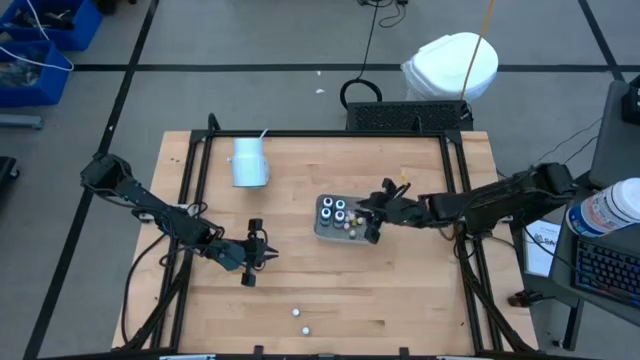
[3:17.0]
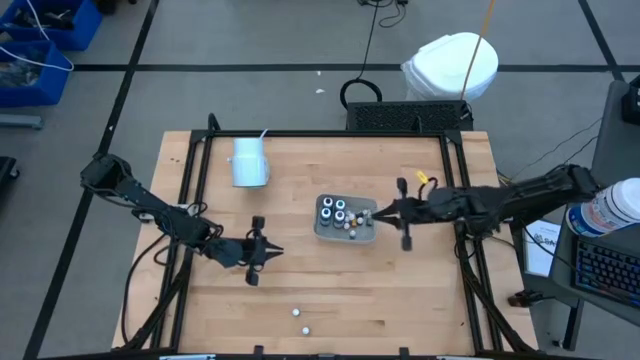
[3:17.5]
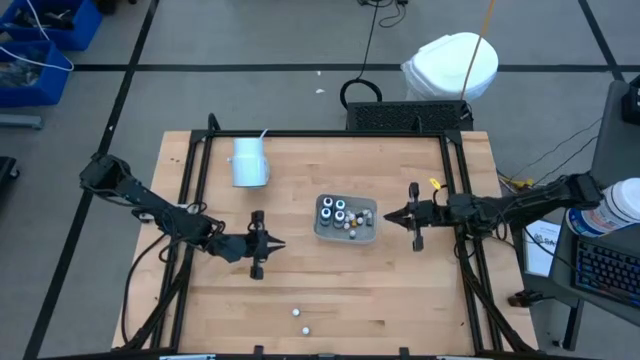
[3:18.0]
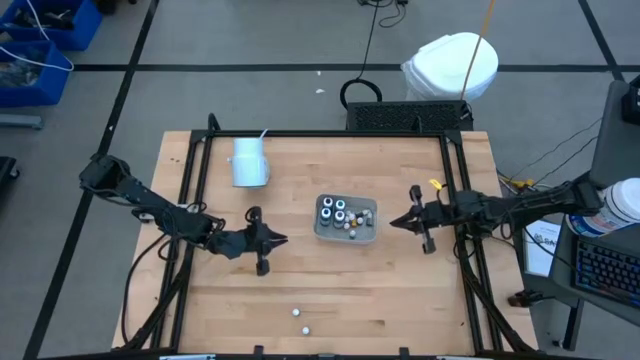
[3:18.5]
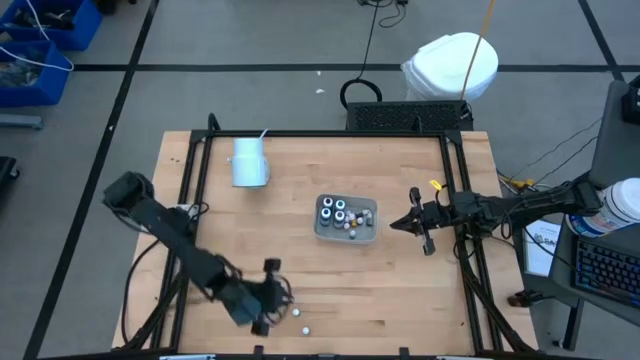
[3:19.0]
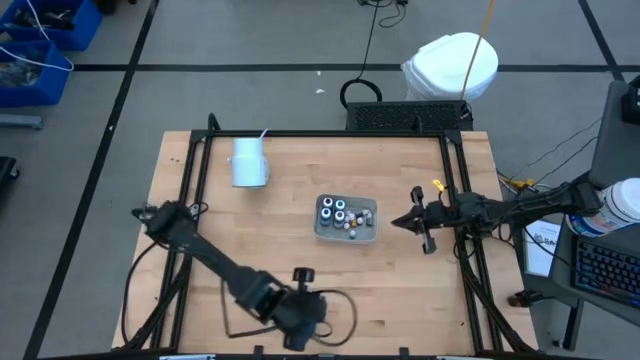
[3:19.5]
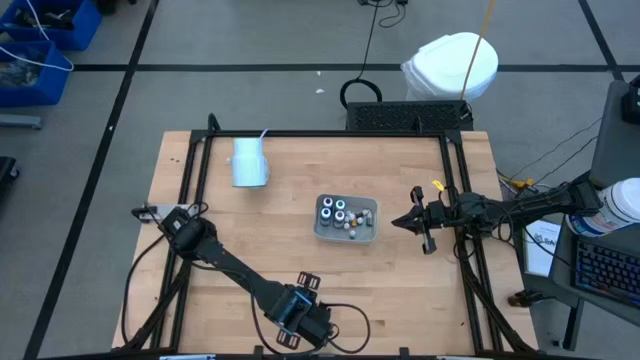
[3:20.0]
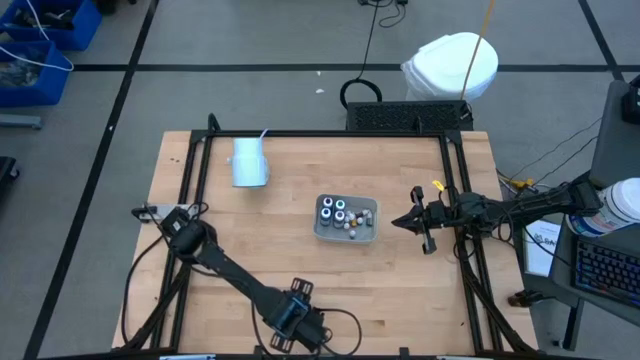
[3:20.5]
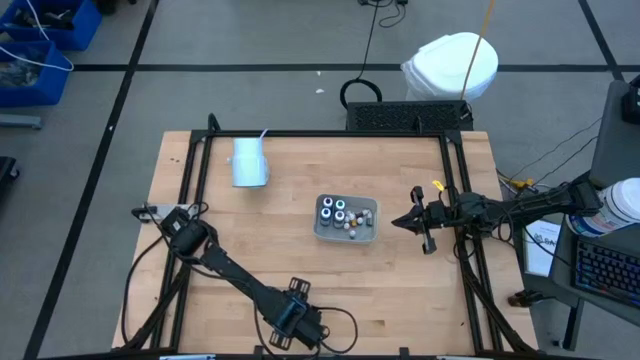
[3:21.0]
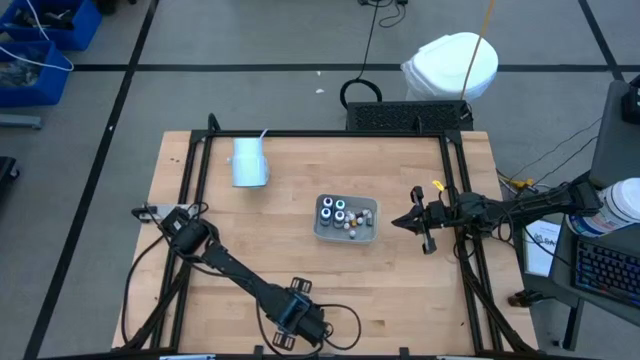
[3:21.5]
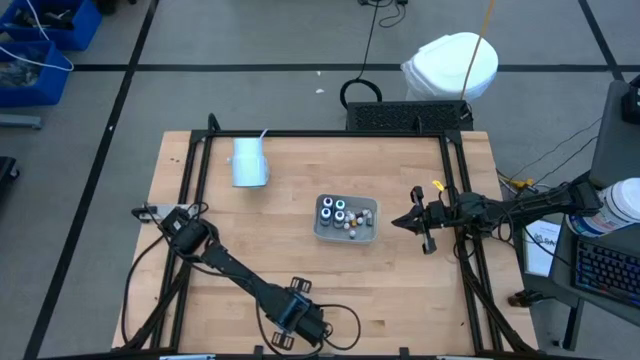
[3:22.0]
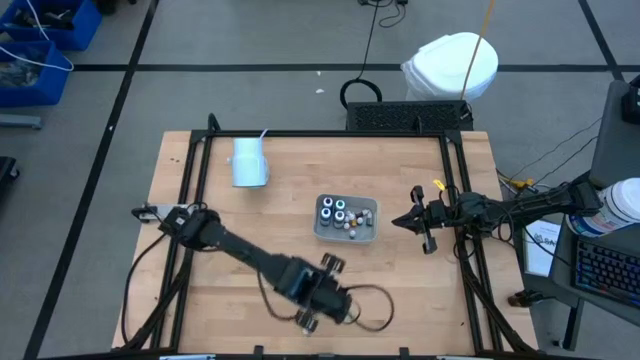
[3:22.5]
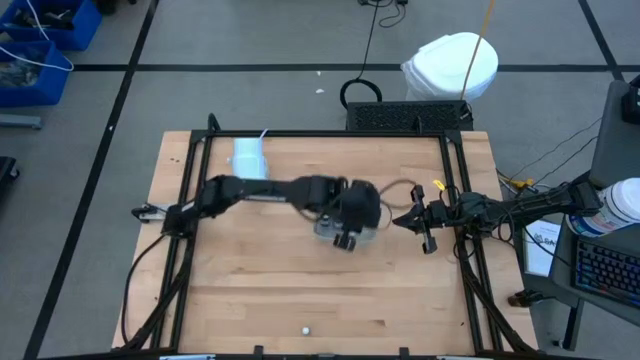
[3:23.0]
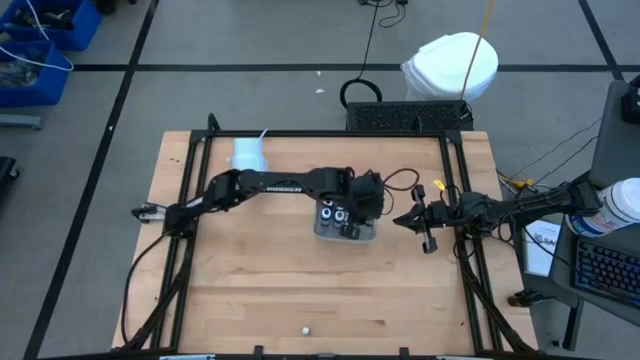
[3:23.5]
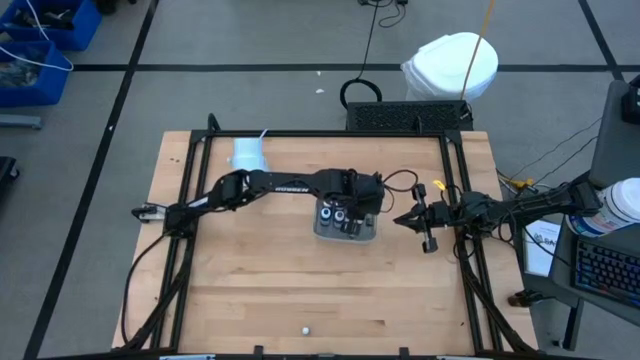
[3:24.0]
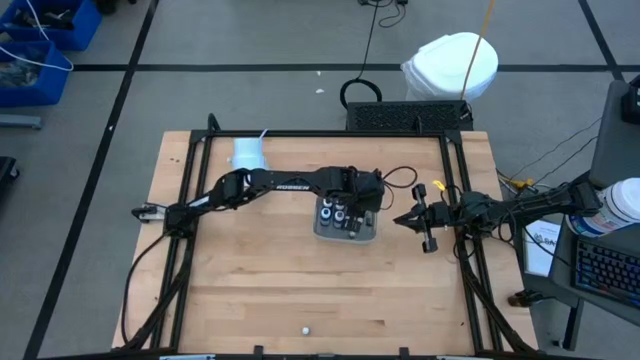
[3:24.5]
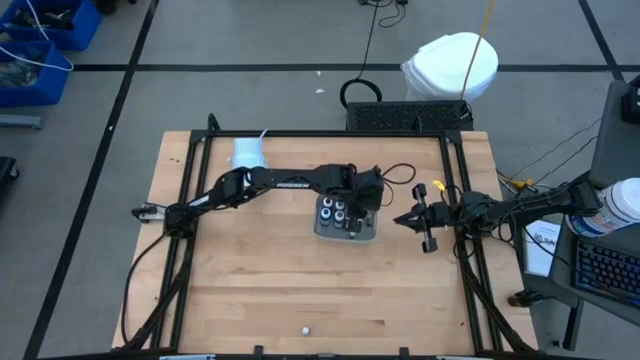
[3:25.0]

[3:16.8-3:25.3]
Task: Pick & Place food coloring
Put the small purple food coloring bottle into the white container

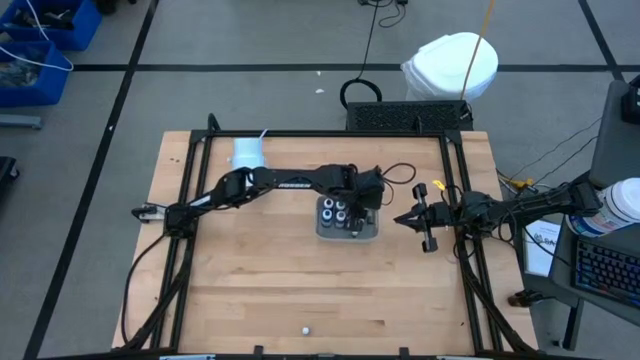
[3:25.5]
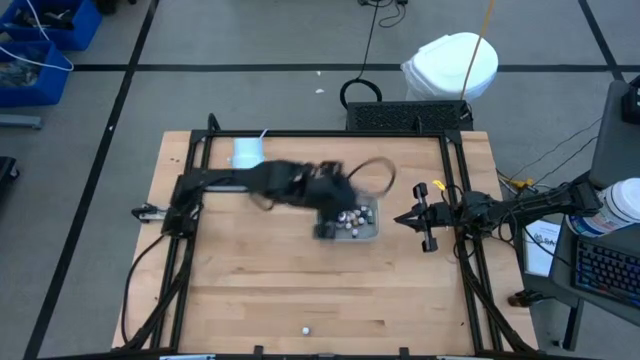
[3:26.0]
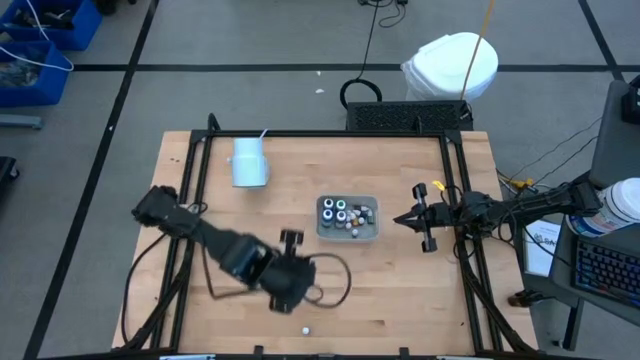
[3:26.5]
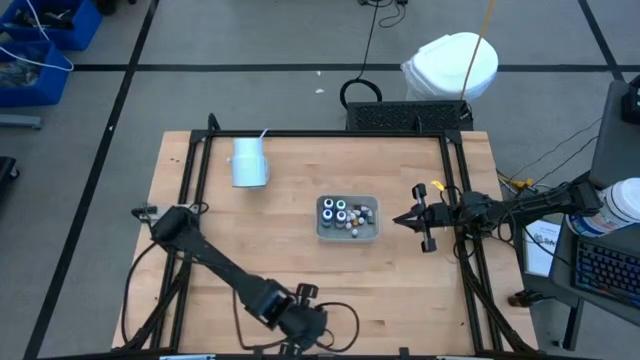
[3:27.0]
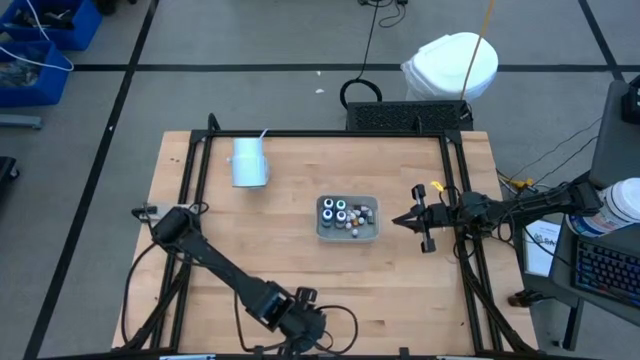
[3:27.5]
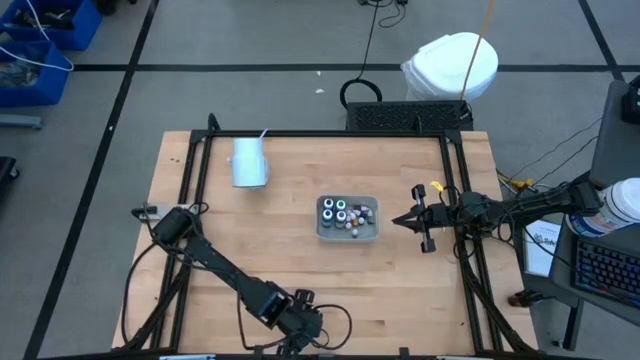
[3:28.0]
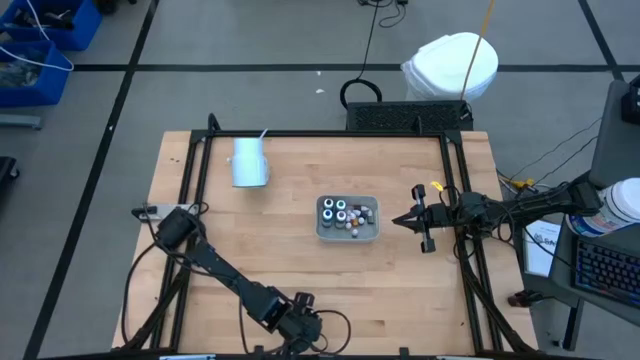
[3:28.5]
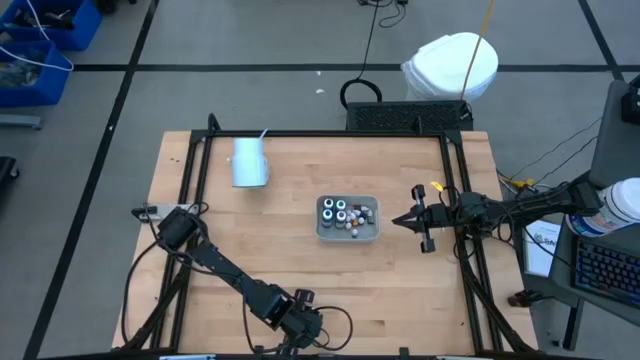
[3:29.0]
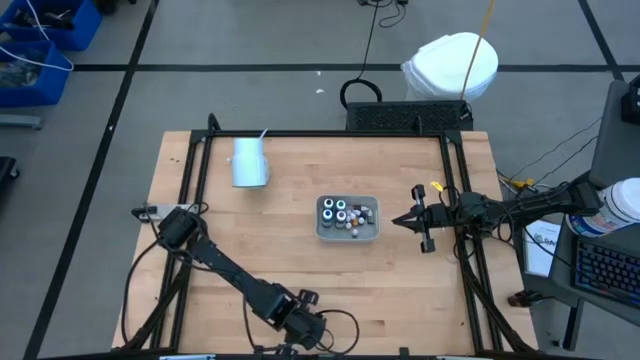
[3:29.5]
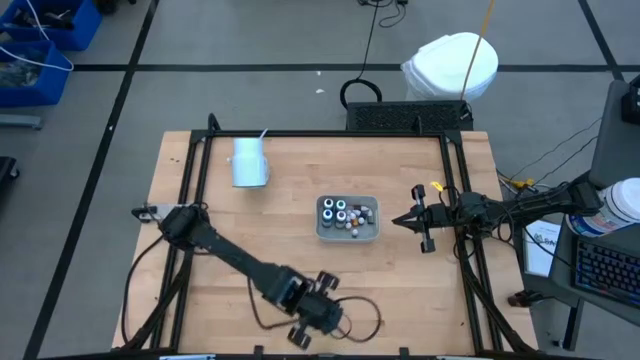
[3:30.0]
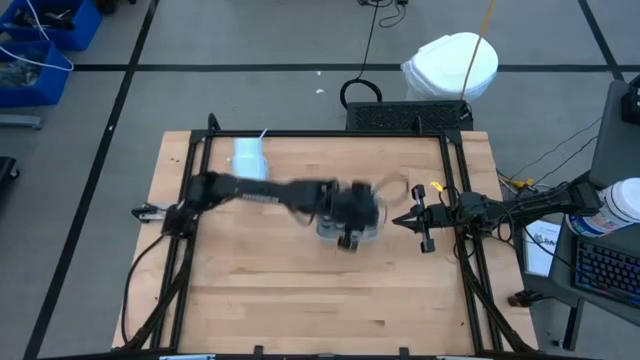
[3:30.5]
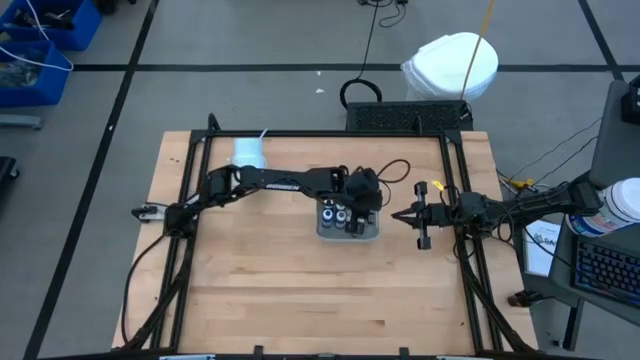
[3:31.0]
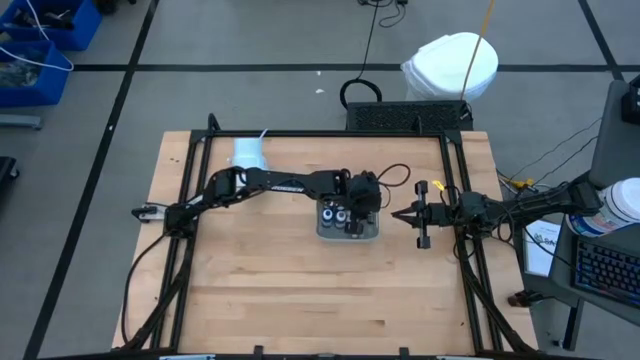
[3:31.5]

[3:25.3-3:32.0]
Put the small green food coloring bottle into the white container

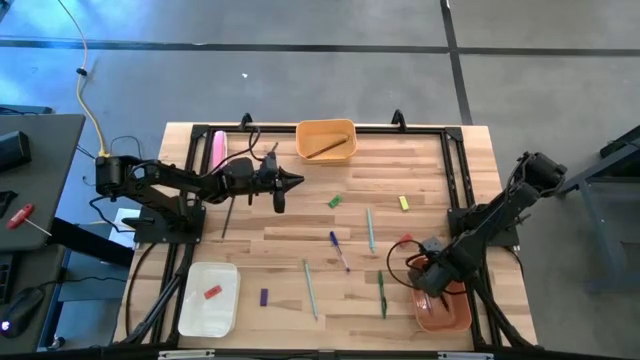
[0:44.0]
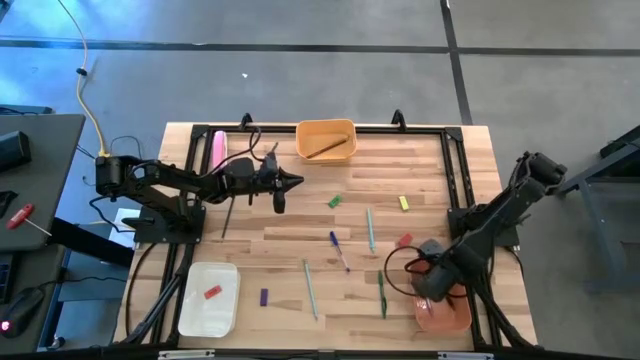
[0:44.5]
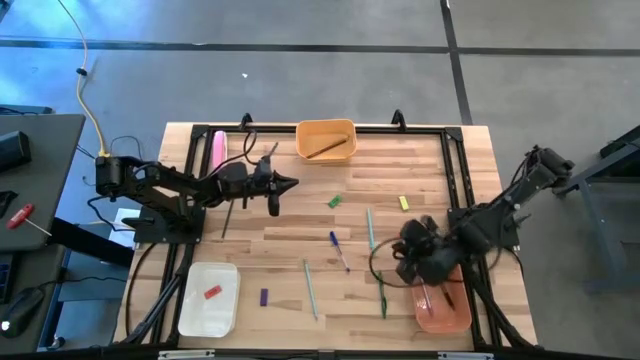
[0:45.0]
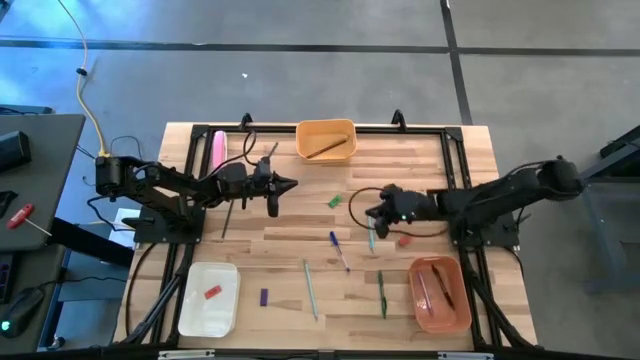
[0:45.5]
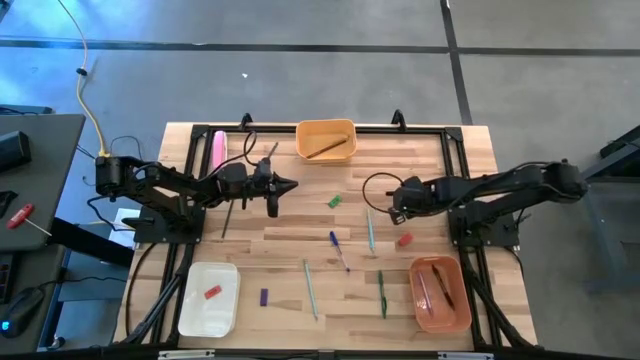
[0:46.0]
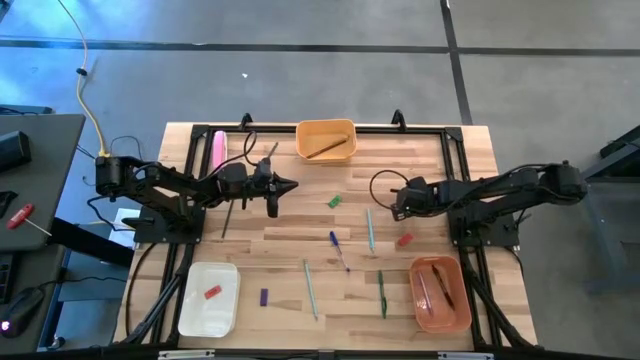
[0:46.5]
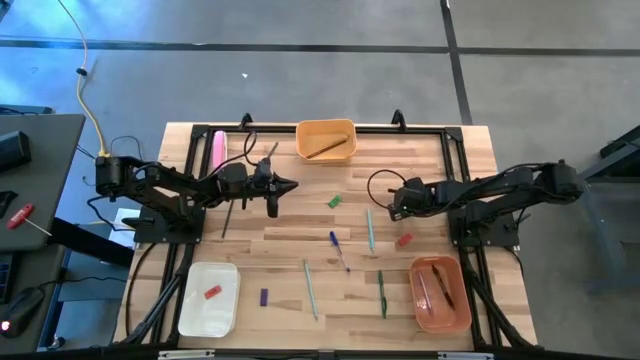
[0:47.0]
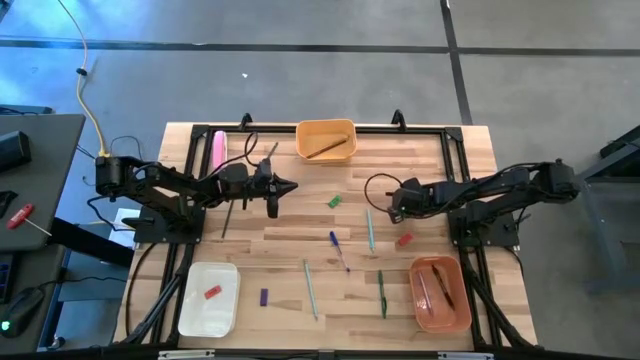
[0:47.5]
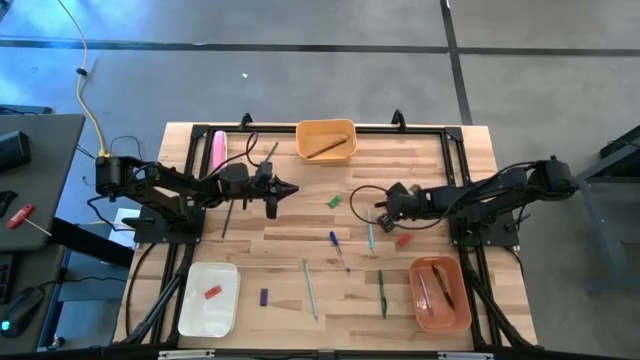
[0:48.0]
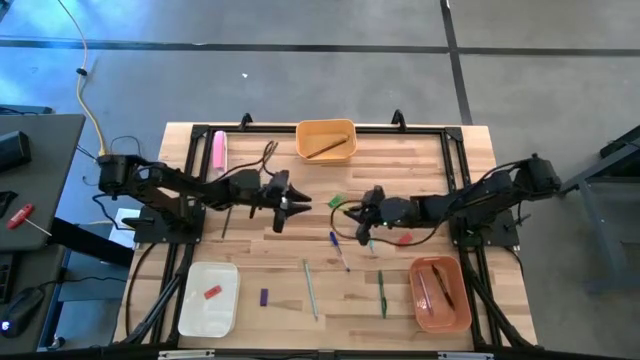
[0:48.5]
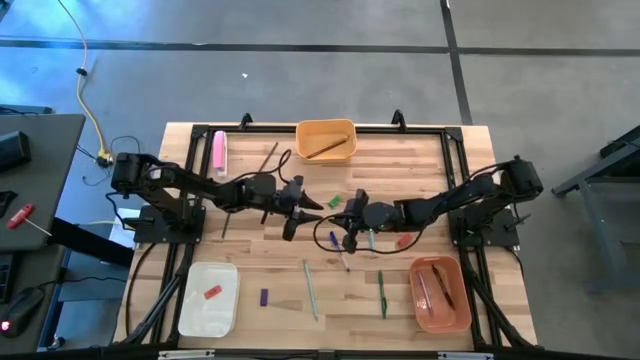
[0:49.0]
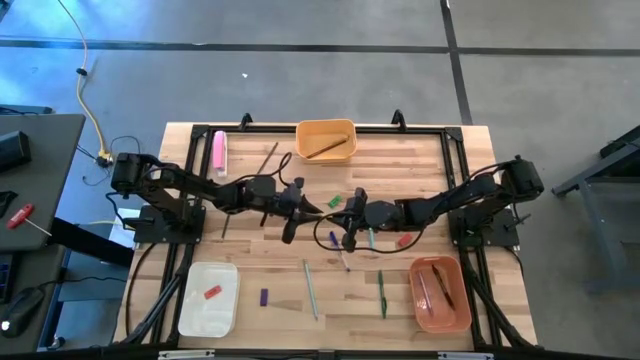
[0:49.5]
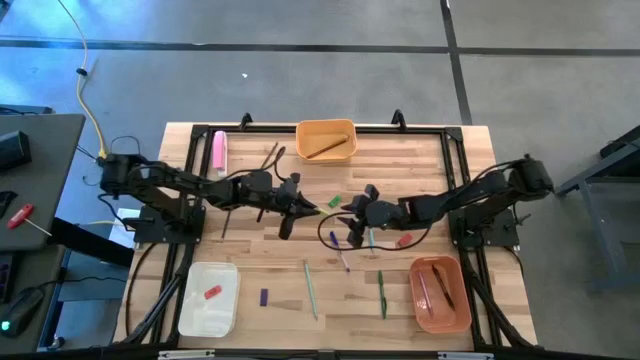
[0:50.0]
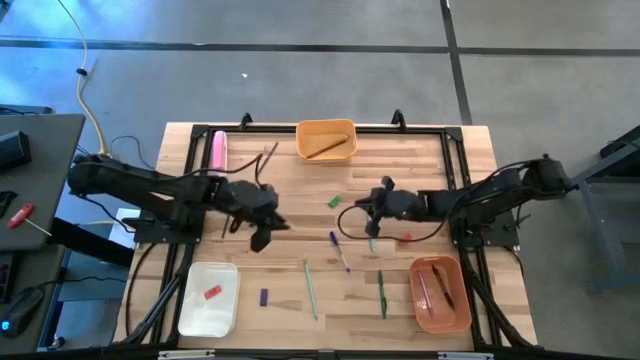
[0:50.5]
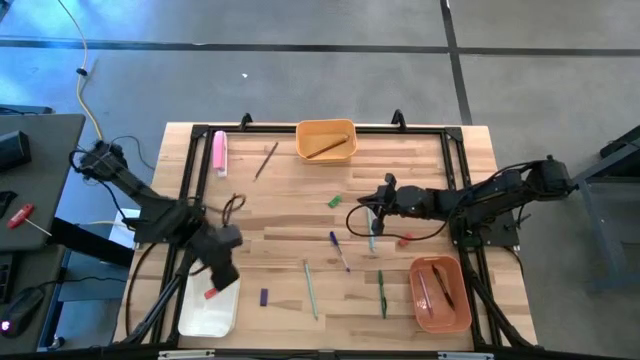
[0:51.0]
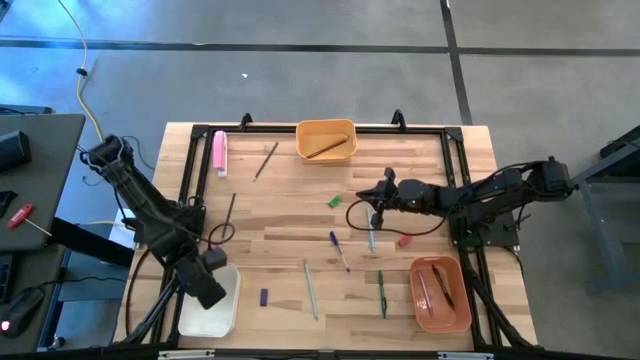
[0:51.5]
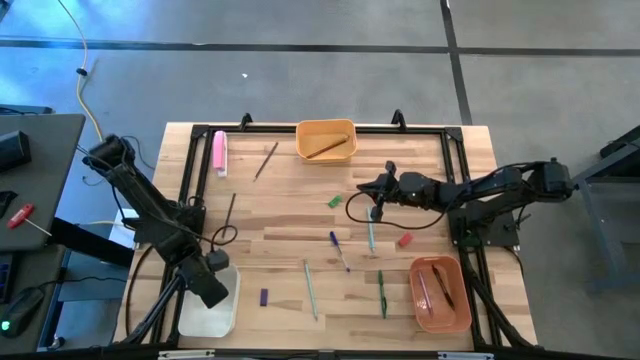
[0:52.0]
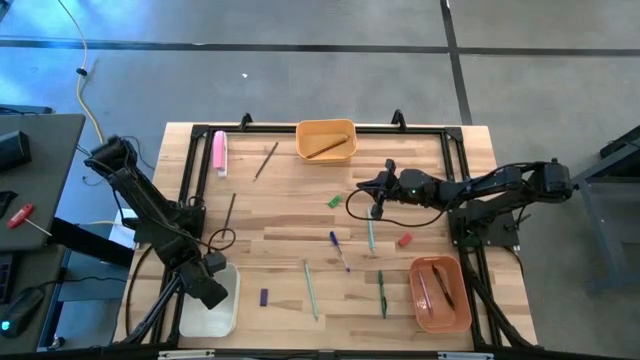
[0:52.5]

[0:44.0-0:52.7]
Task: Sort crayons/erasers/pens/pencils in bins
Put the light green eraser into the white bin
